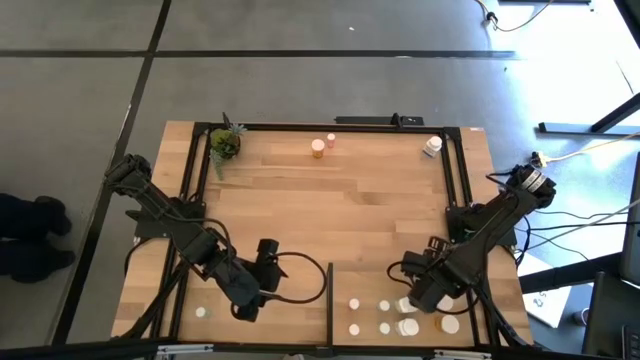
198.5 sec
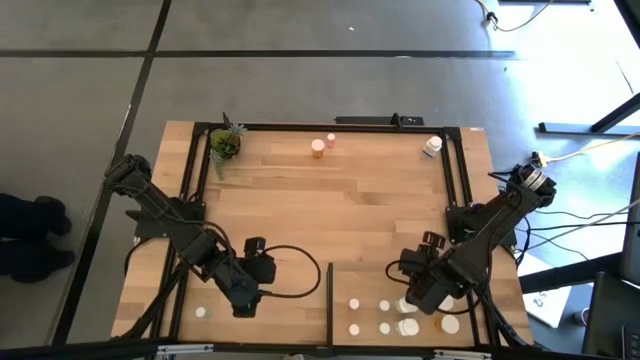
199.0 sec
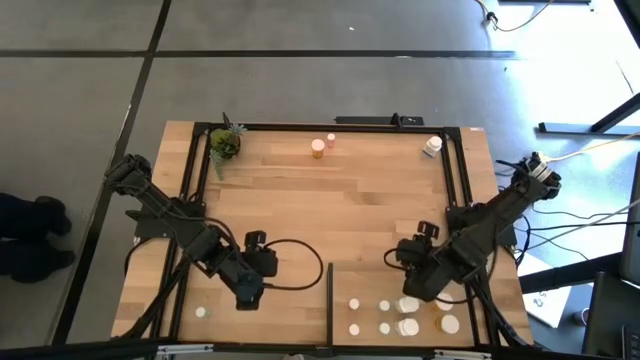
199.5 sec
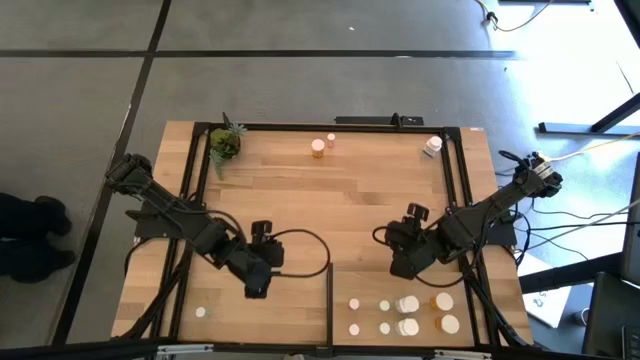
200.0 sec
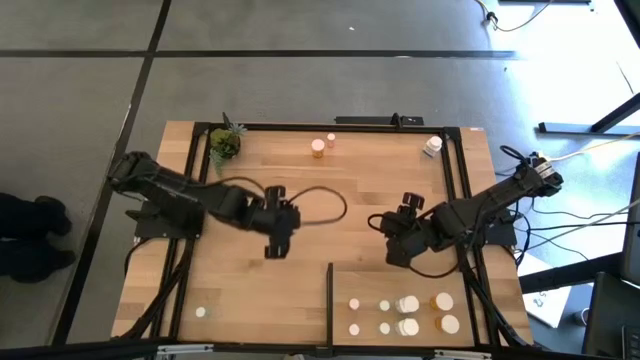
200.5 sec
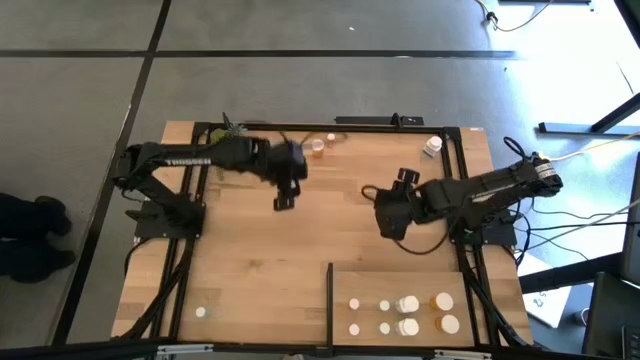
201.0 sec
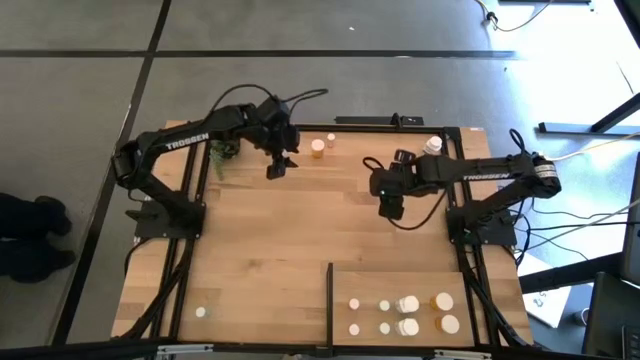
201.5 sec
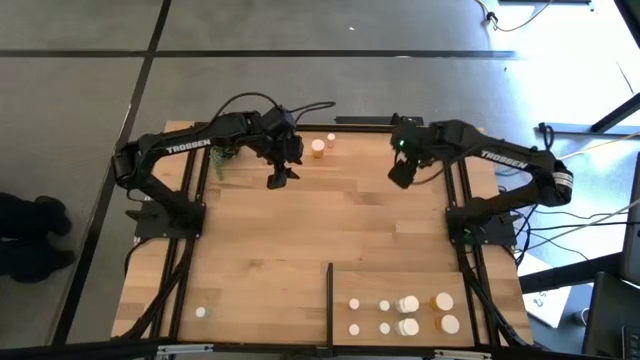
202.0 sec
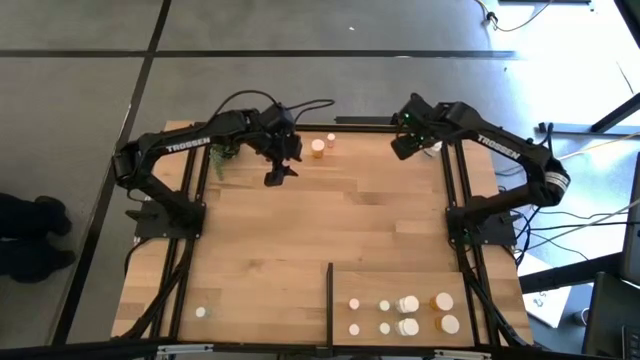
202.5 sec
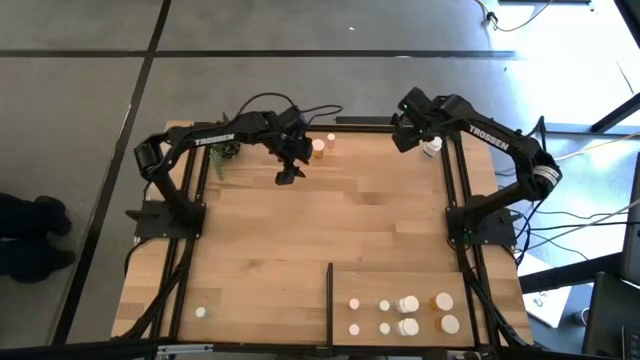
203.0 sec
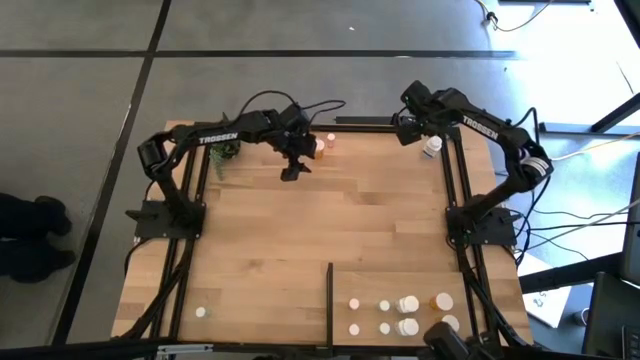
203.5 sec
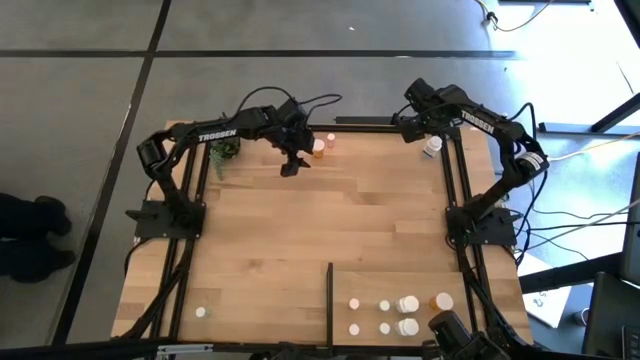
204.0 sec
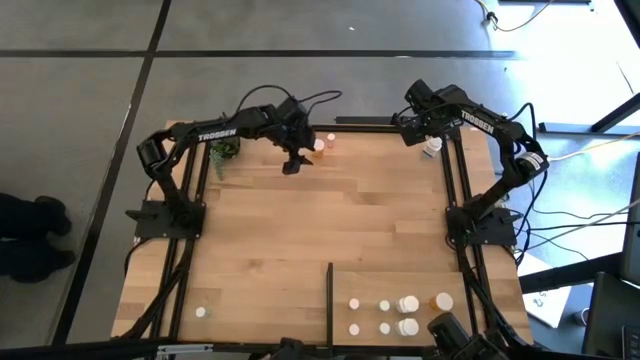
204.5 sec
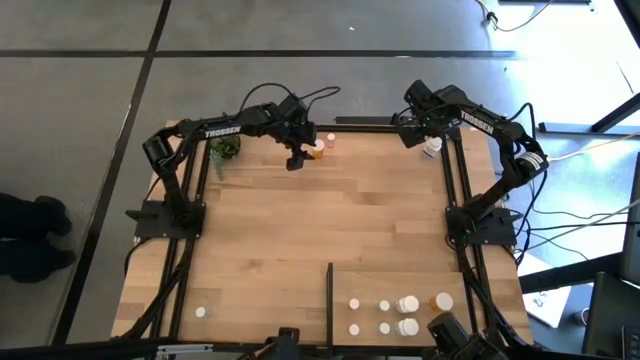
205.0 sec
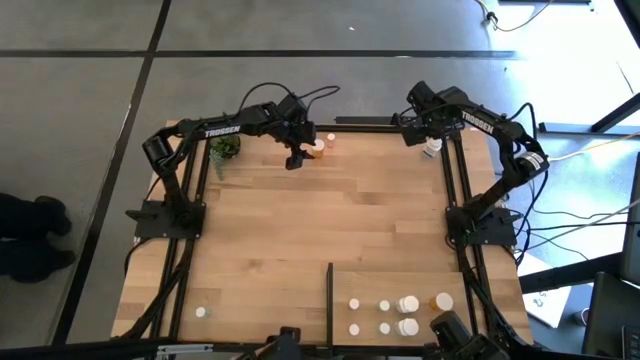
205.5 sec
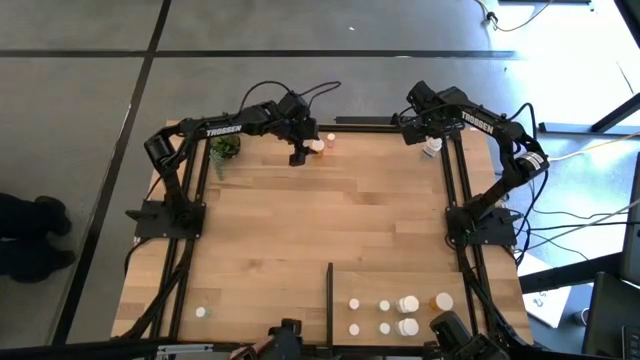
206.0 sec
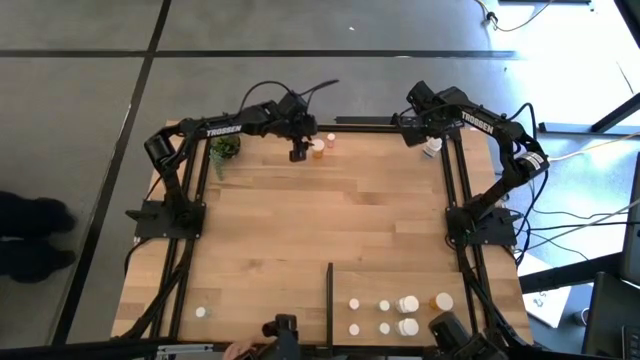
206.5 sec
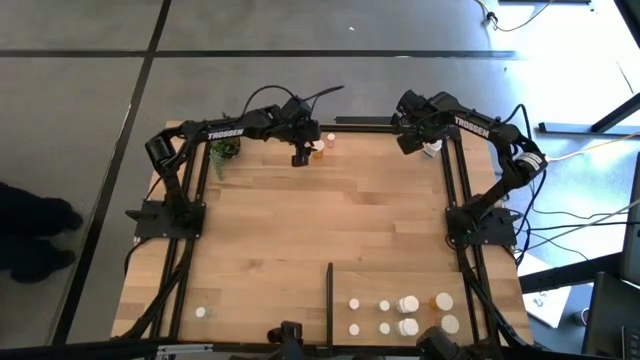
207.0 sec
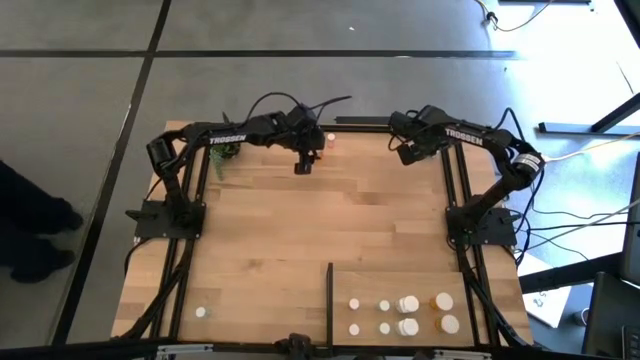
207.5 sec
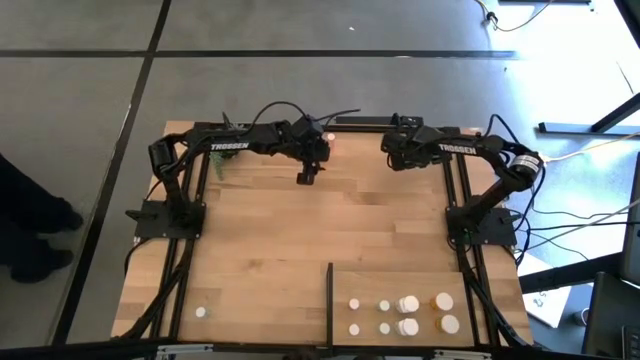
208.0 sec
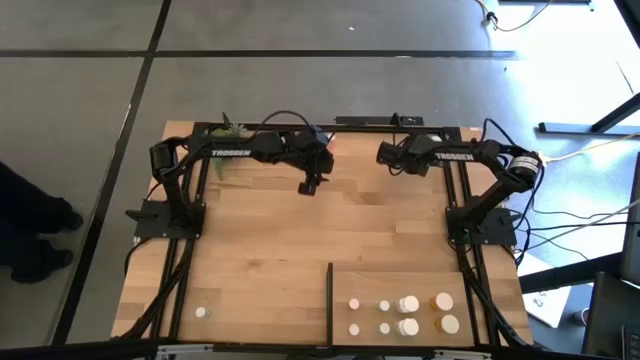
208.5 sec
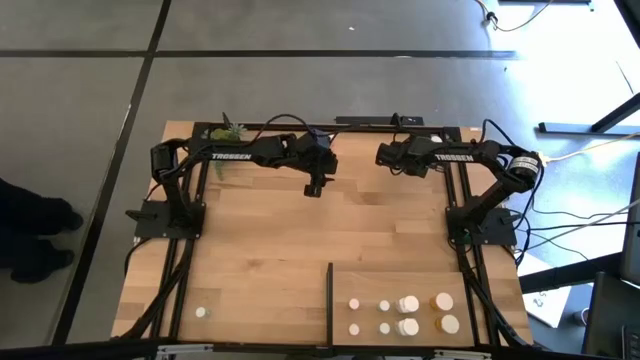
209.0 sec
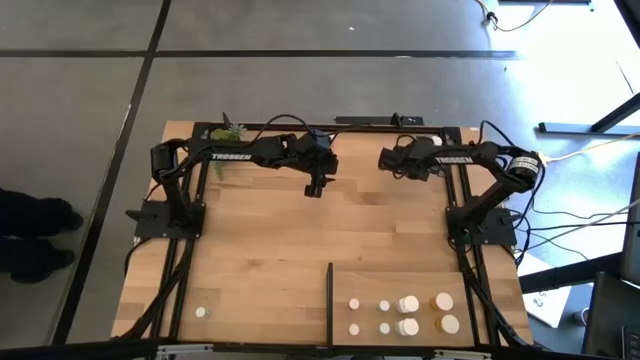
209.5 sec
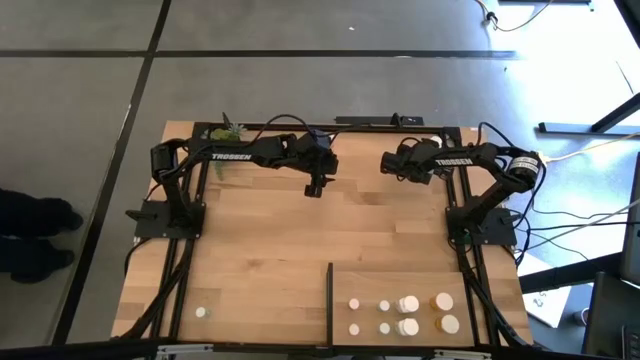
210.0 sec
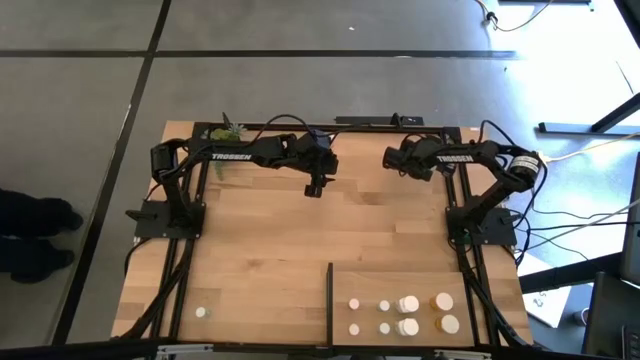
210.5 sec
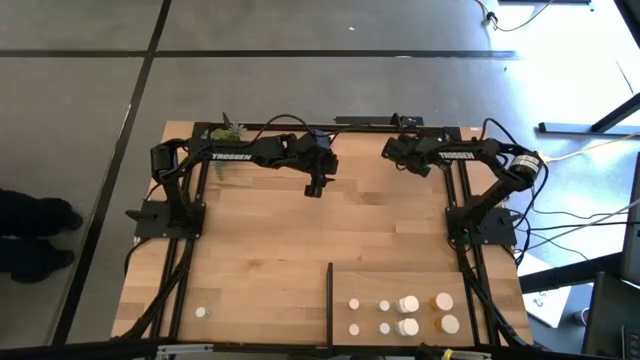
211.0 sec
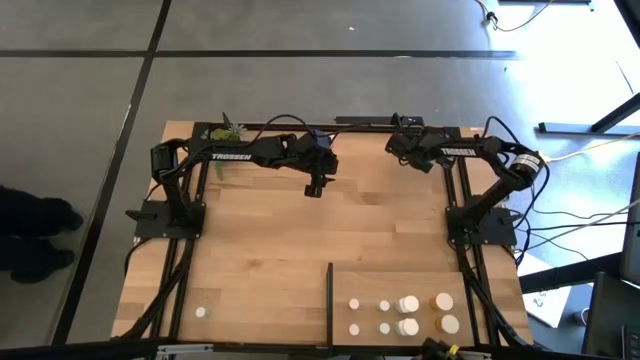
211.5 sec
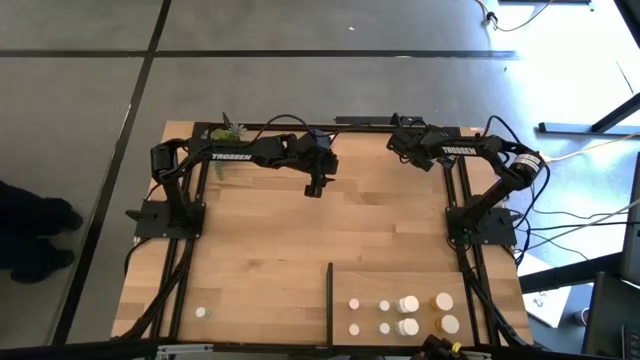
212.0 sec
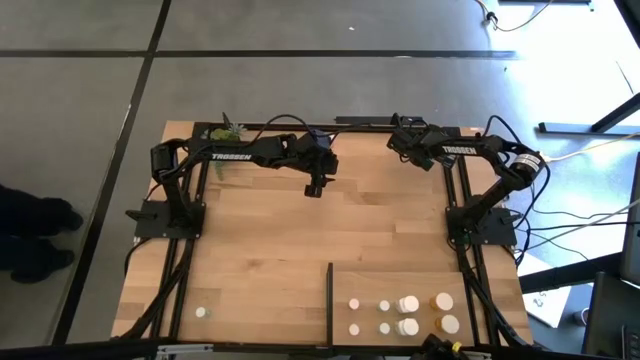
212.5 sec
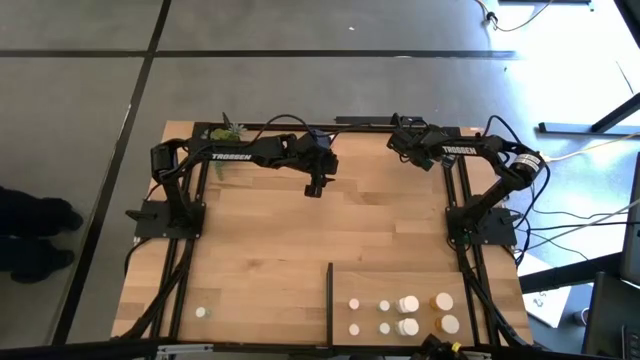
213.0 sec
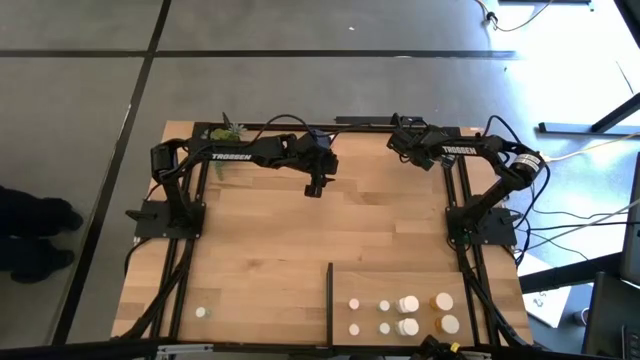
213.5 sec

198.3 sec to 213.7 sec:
Task: Pick and place medicine bottles onto shelf by color
Put the white pill bottle on the shelf aligned with the other white pill bottles

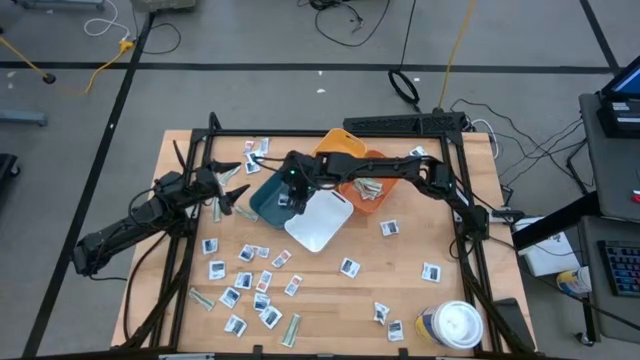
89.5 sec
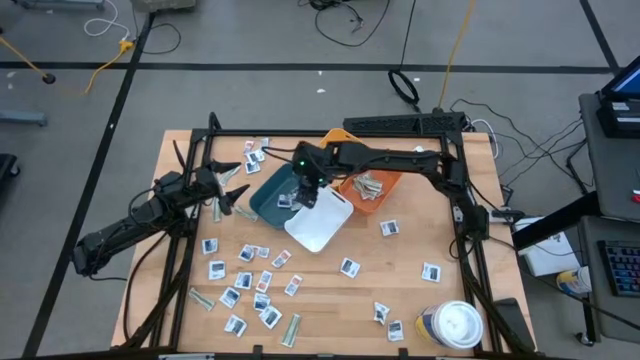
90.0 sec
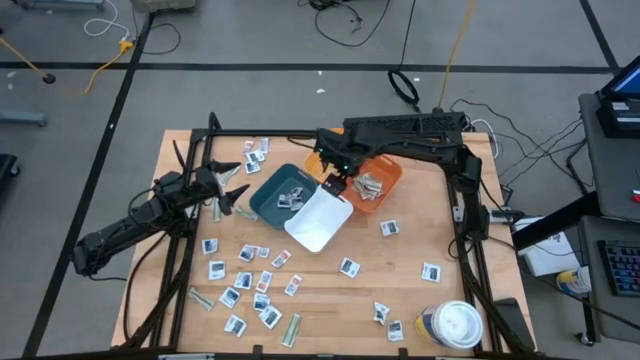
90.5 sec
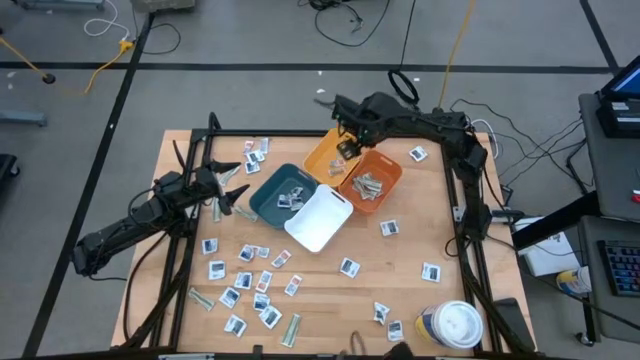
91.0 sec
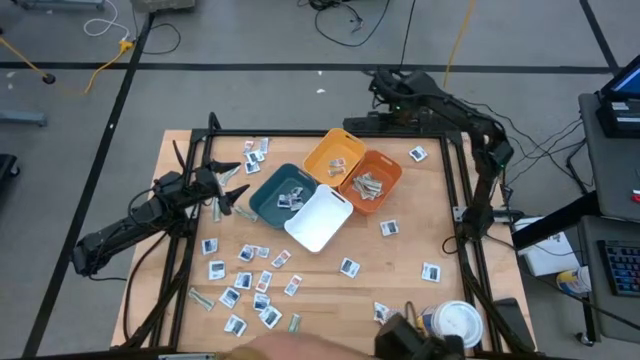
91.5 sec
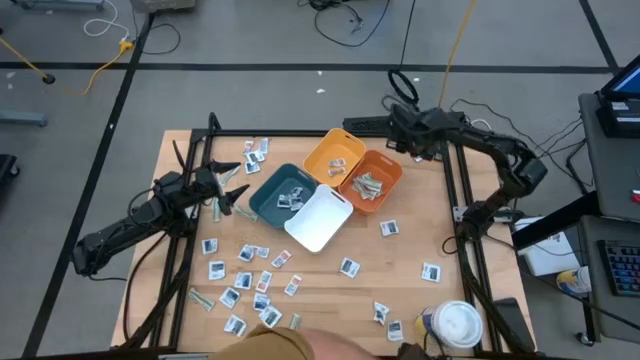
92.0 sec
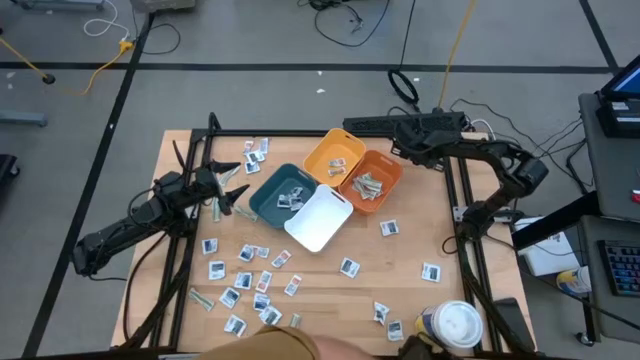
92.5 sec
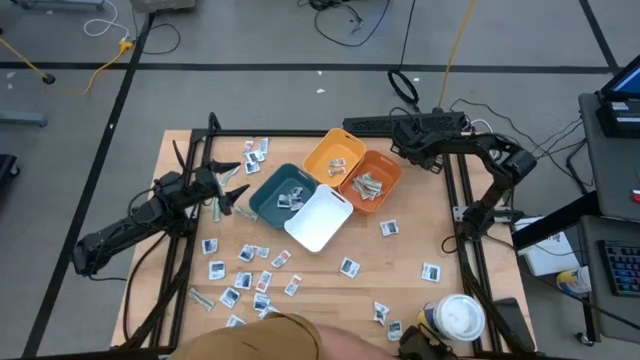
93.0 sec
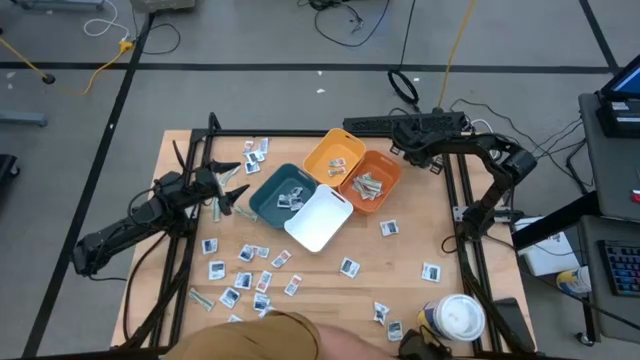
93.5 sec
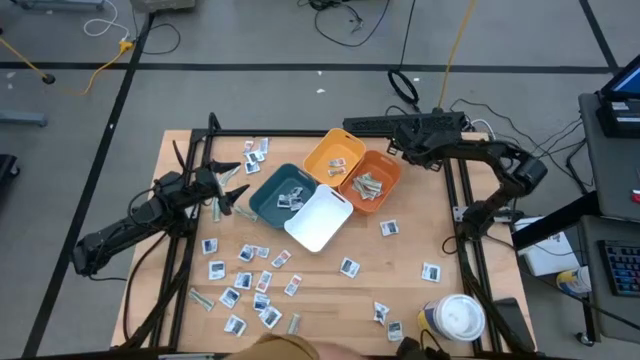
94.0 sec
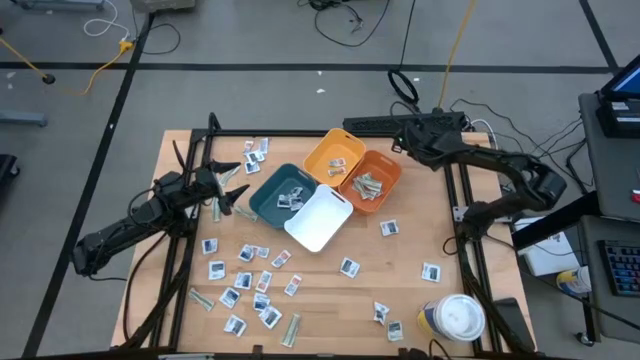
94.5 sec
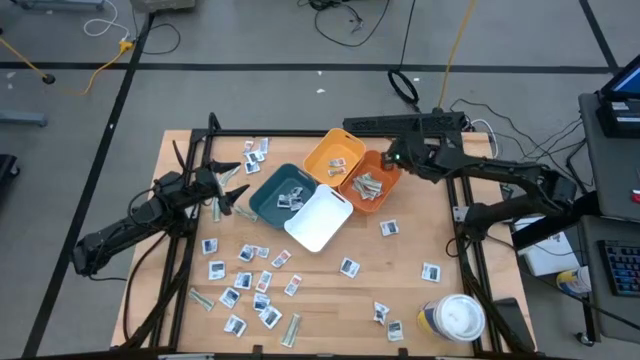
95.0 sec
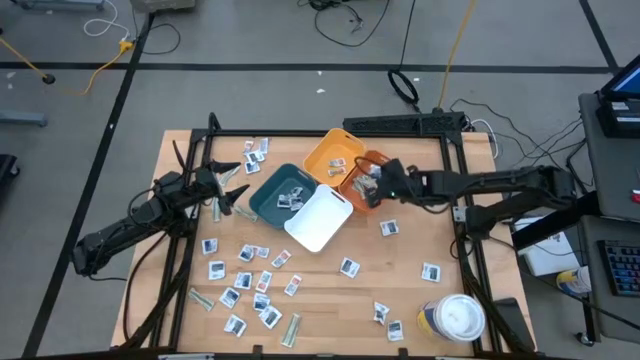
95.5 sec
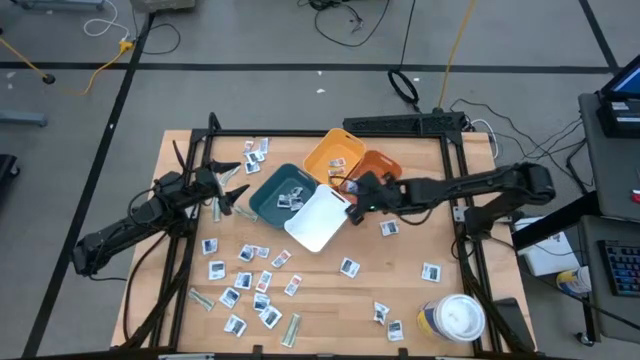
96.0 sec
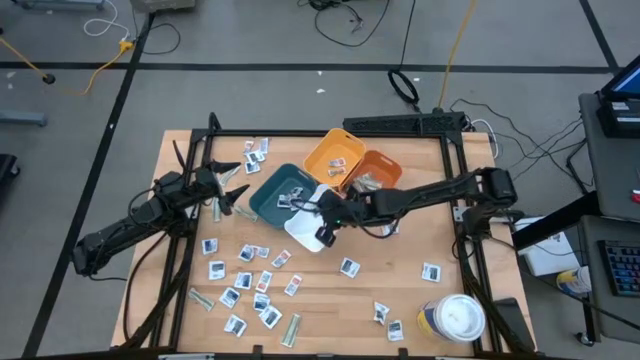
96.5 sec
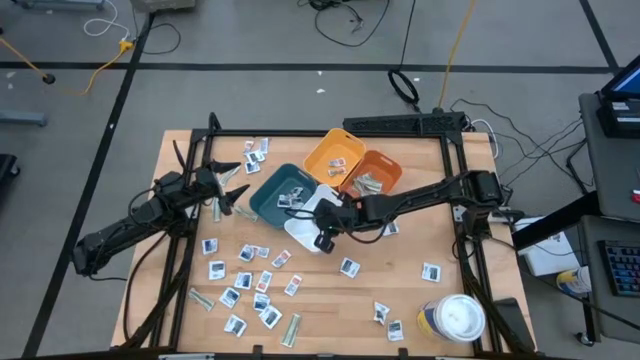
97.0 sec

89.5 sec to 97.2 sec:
Task: Pick & Place First Aid Supplies
Put the black towelette pack into the white bin
